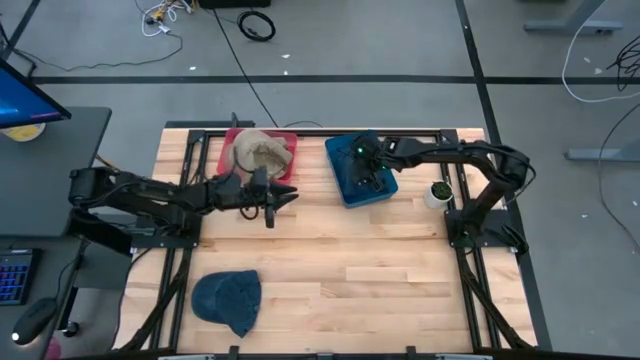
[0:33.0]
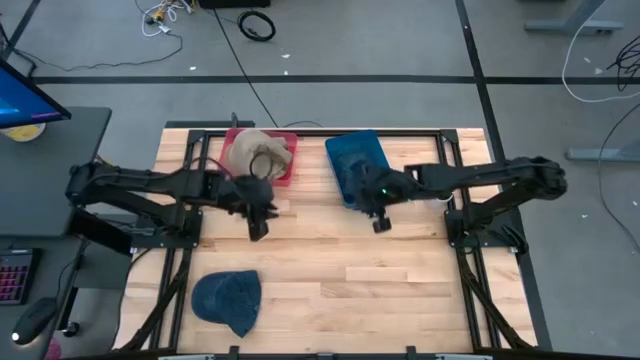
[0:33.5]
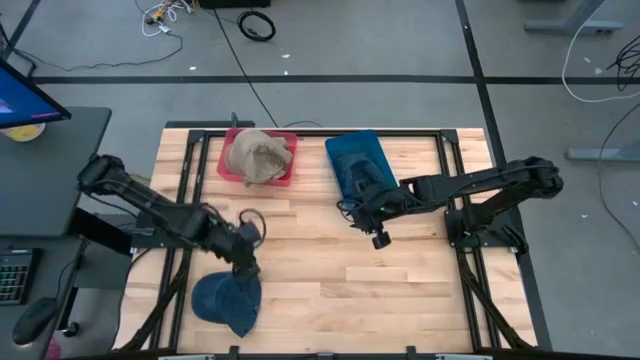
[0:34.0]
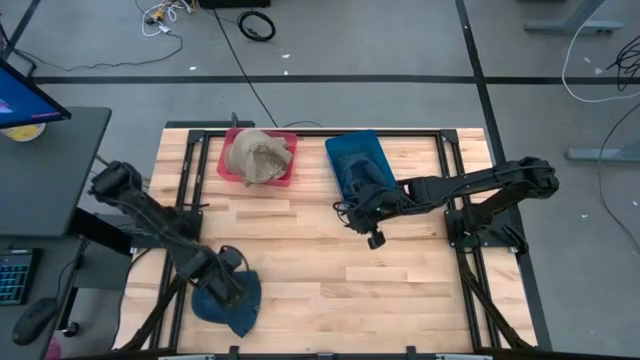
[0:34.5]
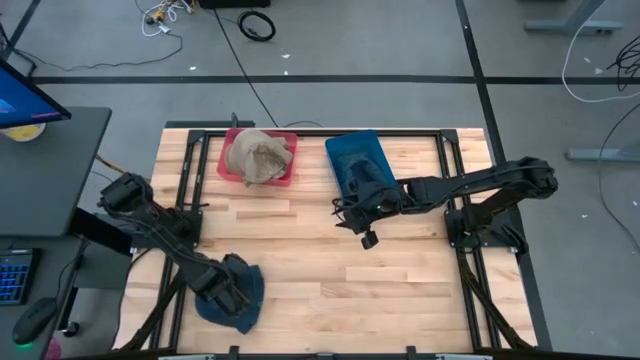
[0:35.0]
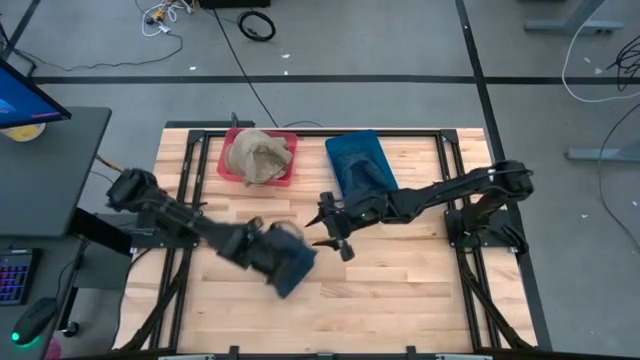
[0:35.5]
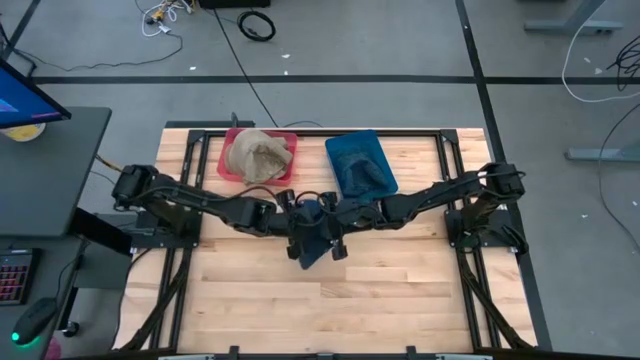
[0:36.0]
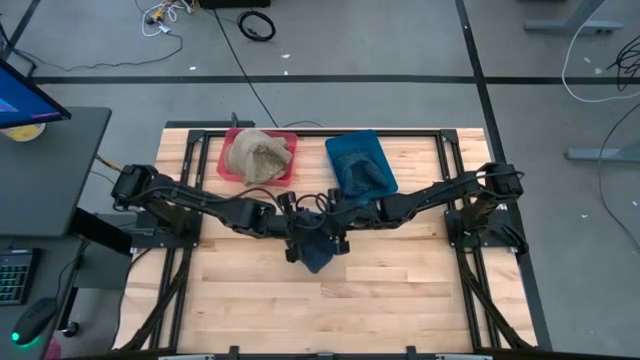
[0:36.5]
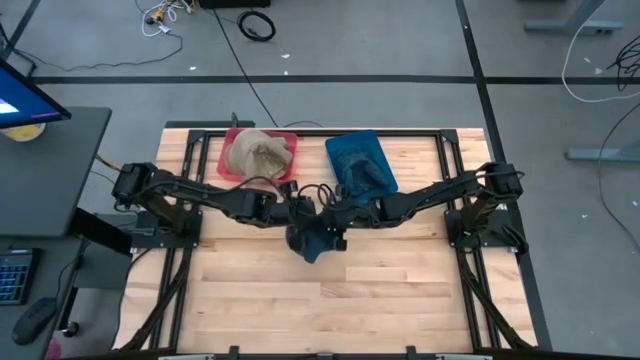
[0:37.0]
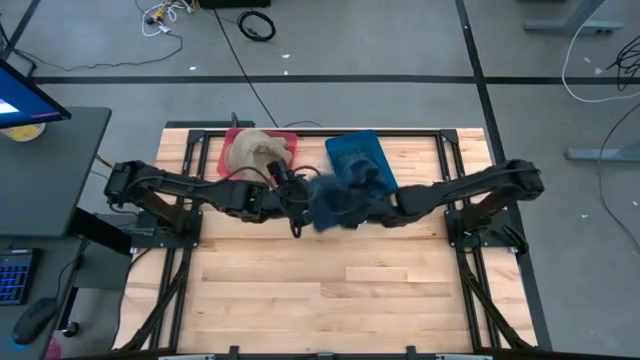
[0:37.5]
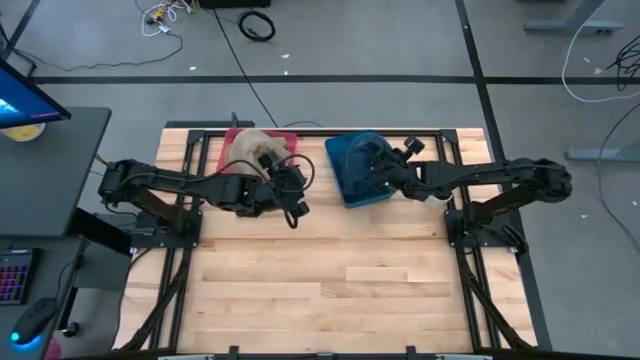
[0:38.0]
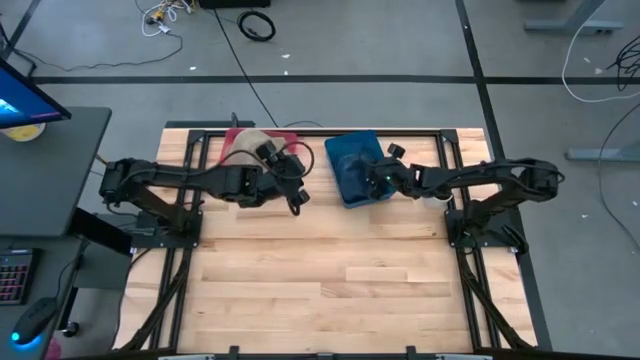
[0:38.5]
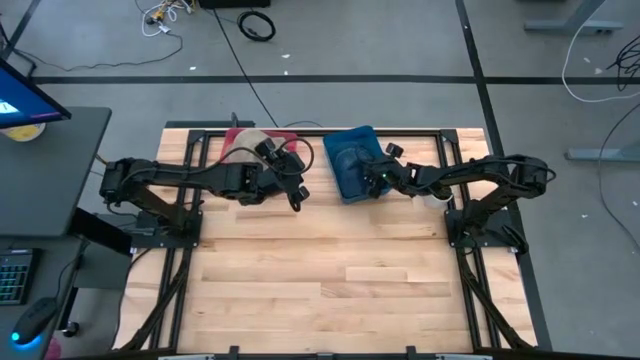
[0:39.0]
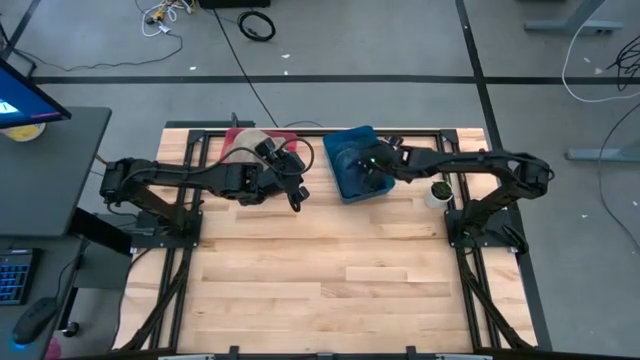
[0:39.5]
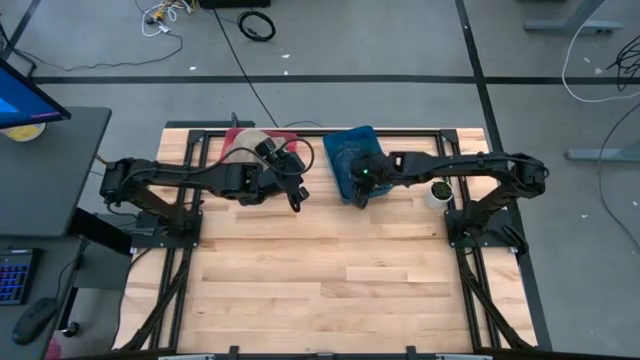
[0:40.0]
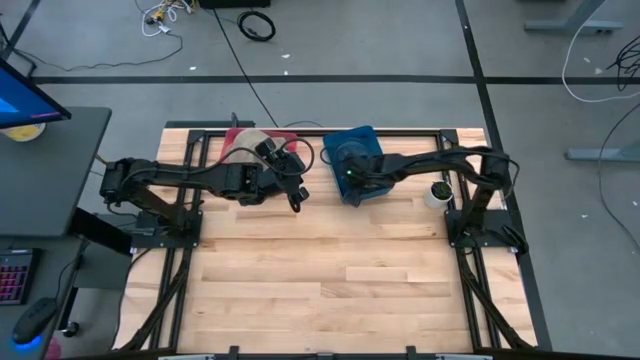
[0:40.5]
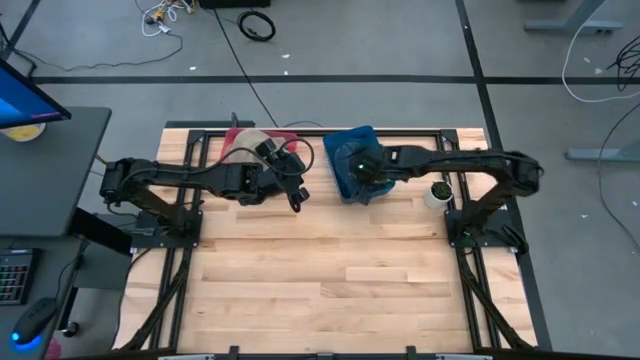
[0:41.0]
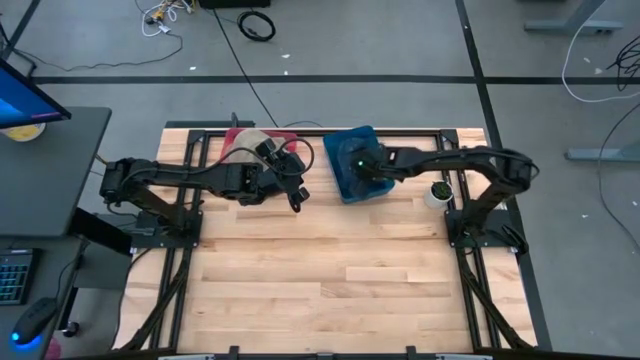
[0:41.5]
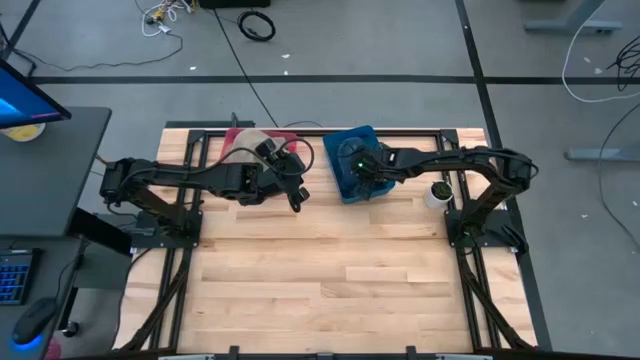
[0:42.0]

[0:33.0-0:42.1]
Task: Pick & Place hat
Put the blue cap into the blue bin

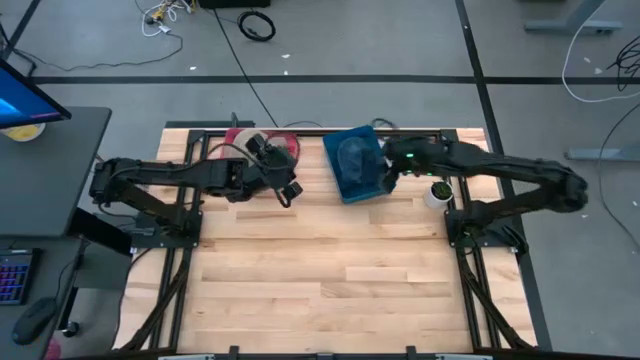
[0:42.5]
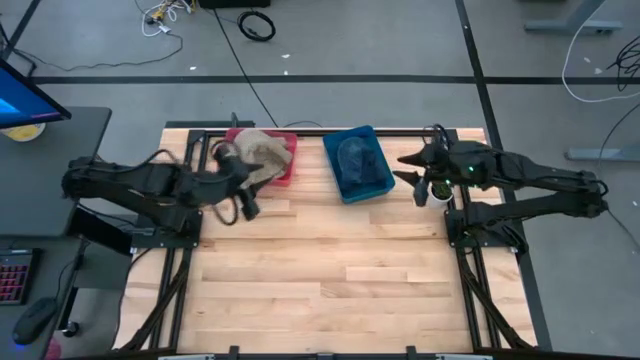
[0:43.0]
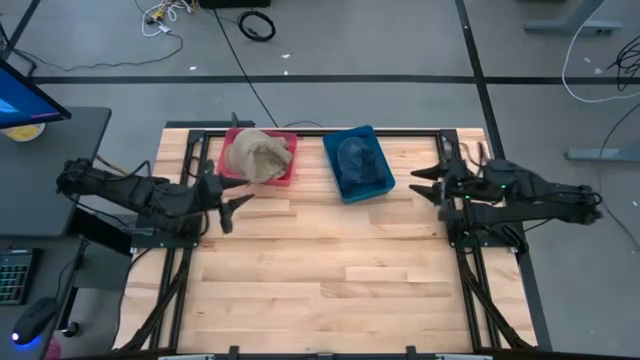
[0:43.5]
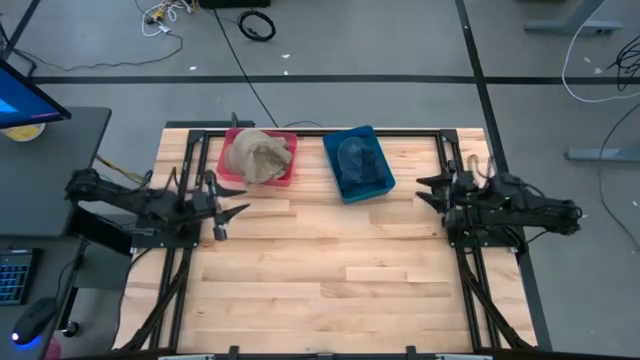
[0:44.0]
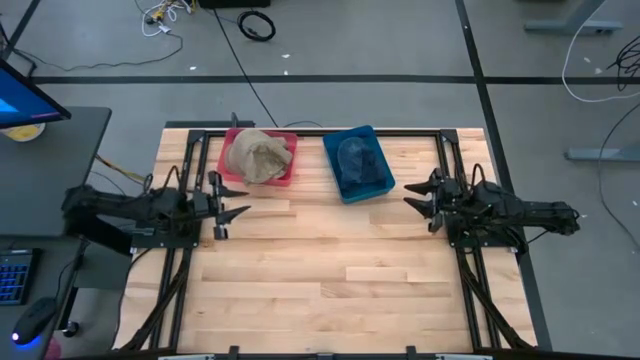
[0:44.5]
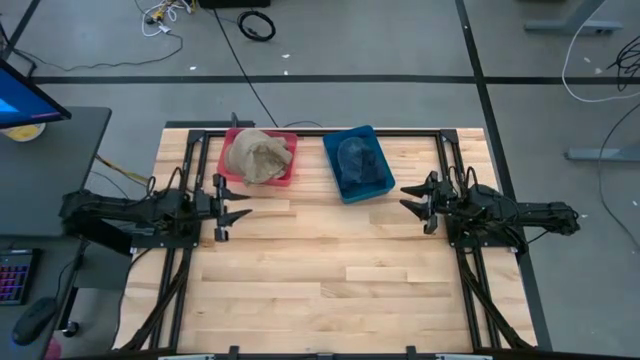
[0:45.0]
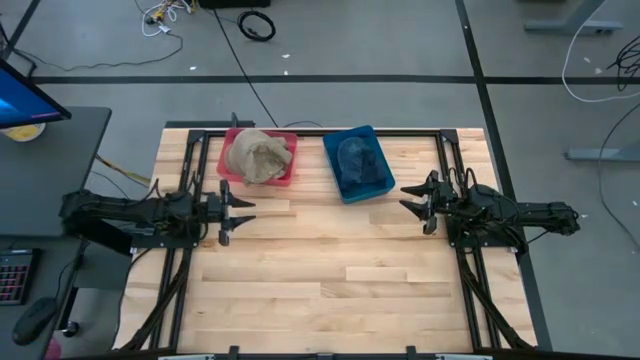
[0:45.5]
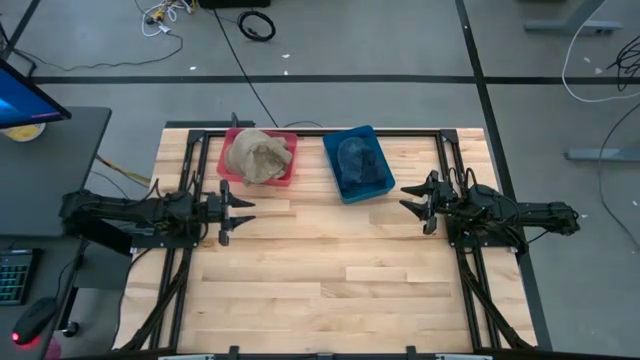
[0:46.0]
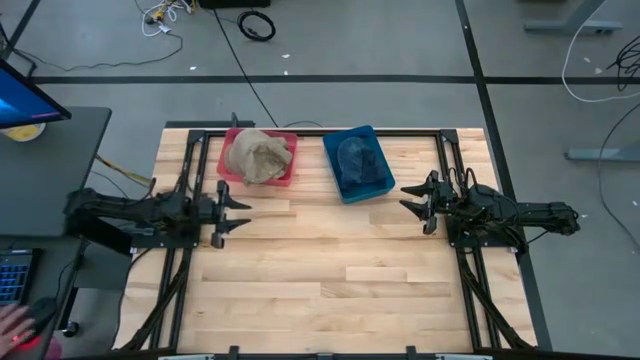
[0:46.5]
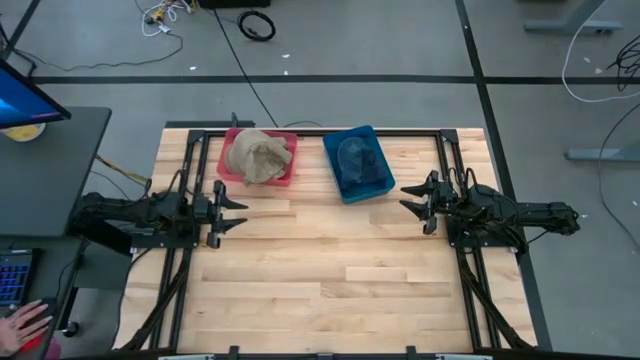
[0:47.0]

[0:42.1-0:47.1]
Return to Home Position

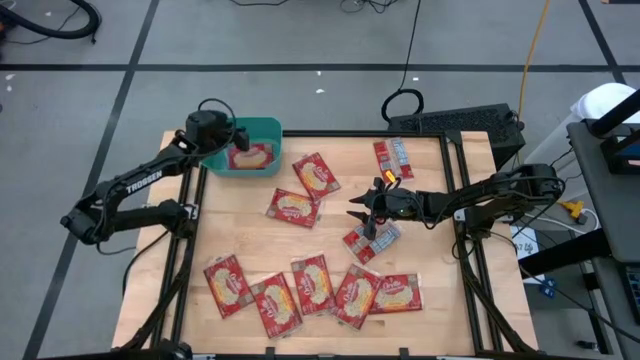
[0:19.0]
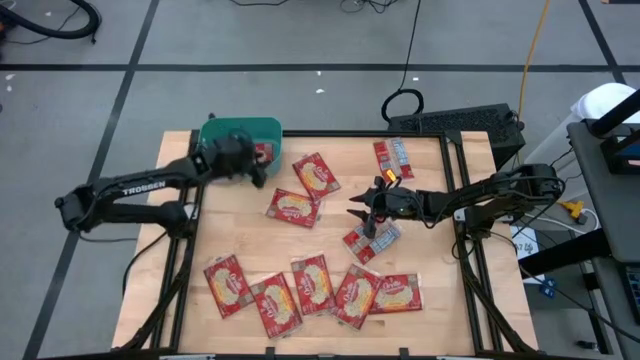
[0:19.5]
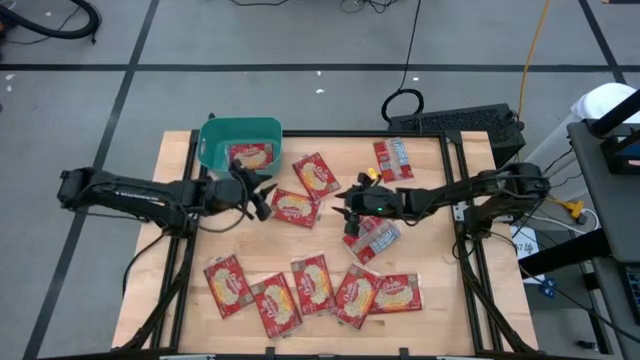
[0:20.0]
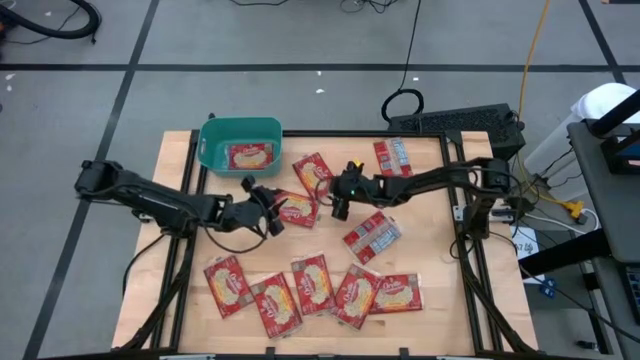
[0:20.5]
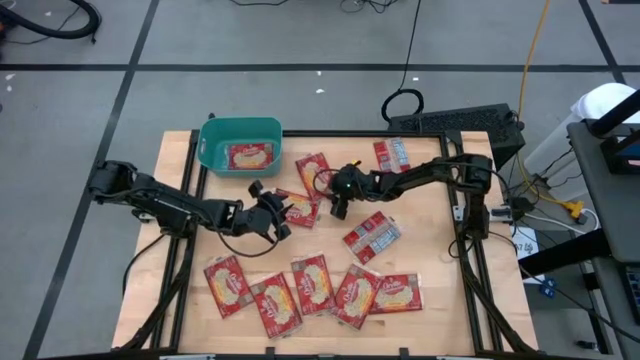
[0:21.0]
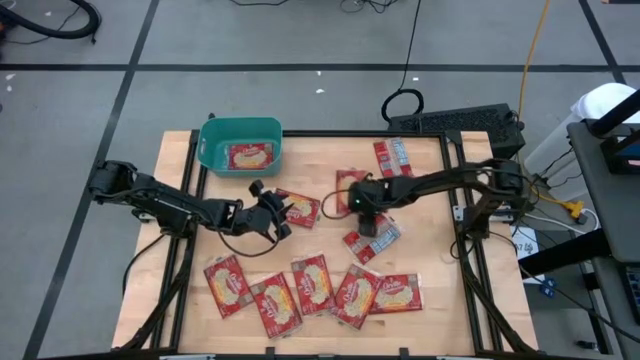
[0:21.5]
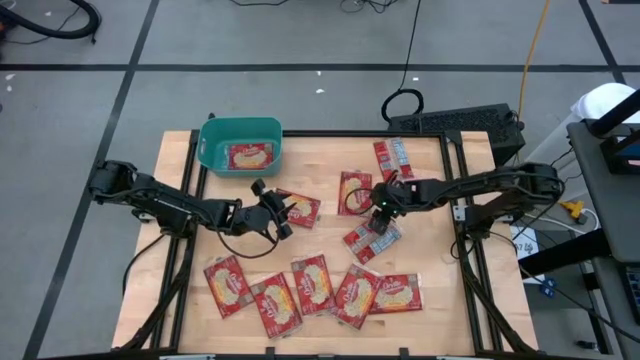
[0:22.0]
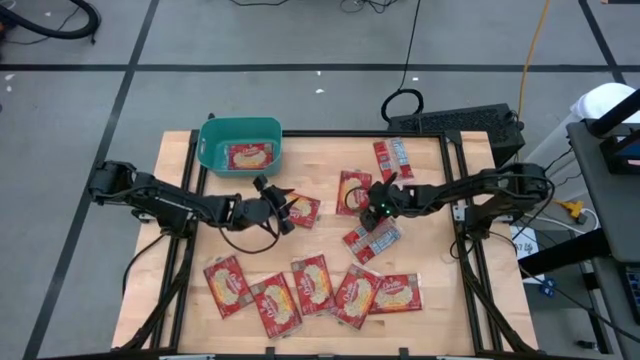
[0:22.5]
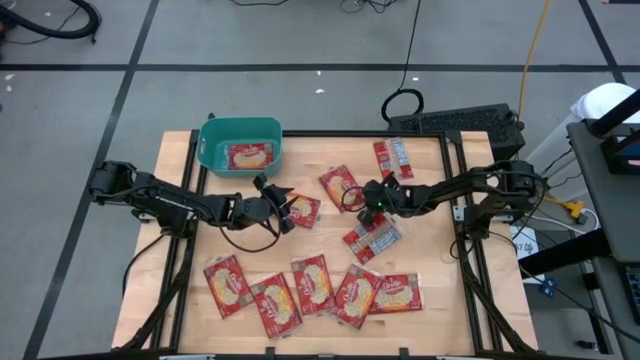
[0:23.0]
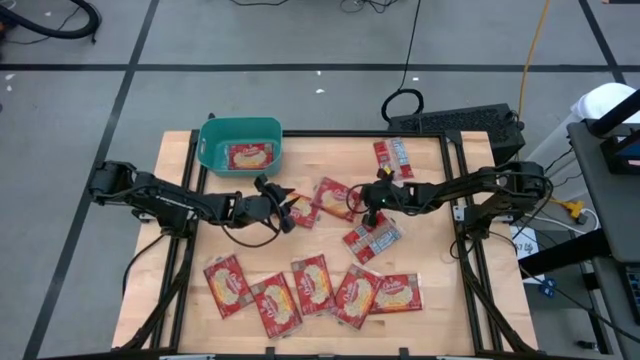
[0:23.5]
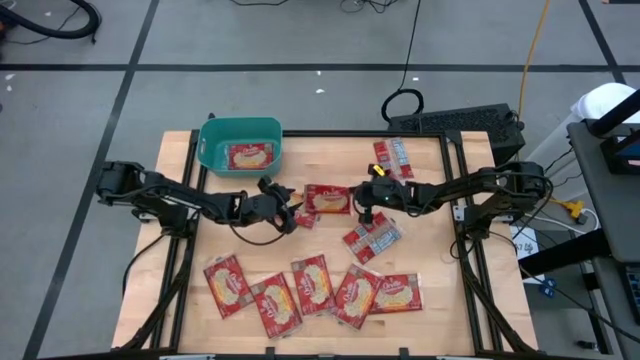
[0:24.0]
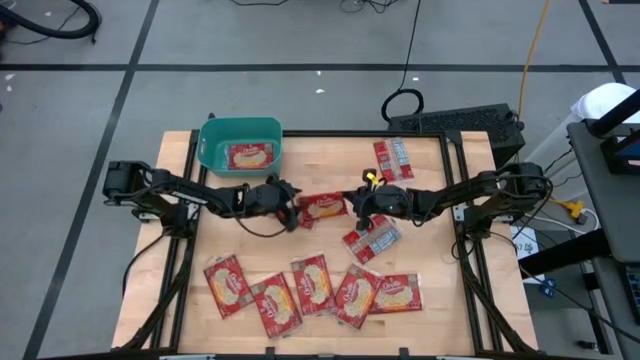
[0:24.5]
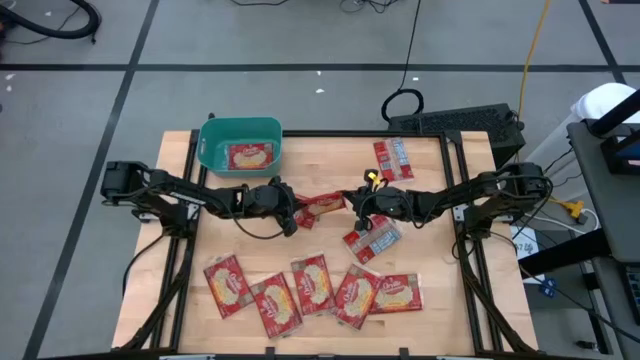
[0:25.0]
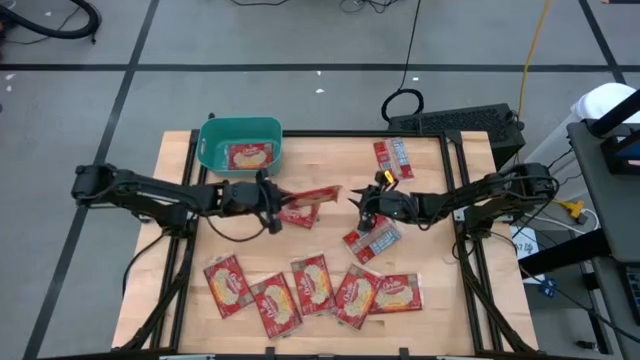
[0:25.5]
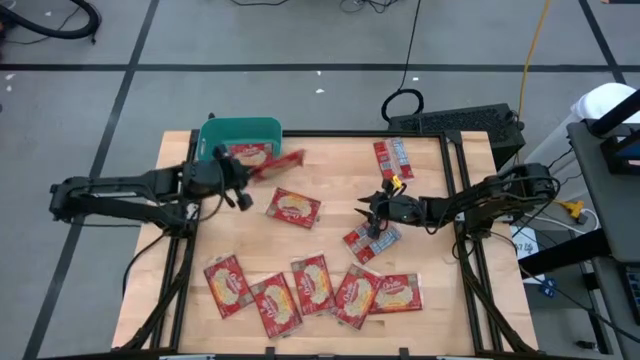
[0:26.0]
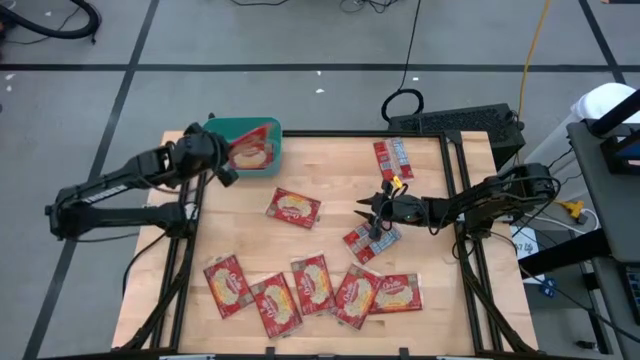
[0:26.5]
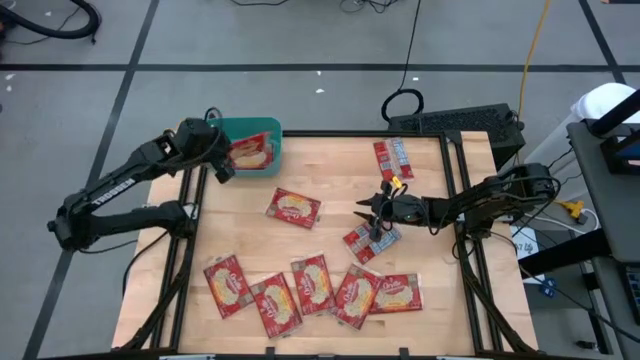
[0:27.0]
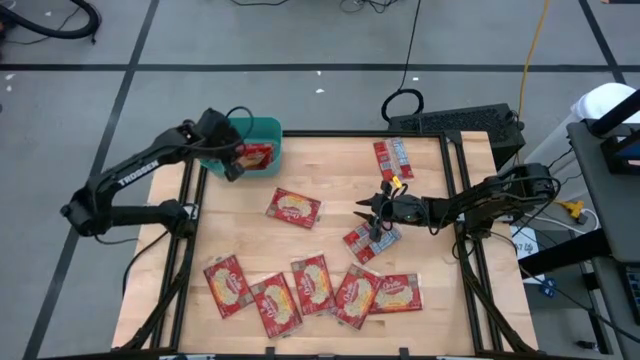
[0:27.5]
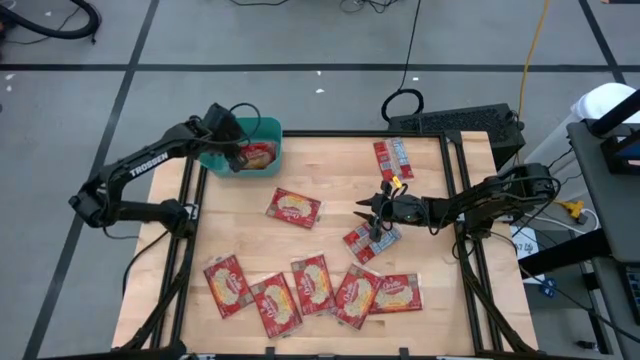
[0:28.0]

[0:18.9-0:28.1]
Task: Sort popcorn bags into baskets
Put the red popcorn bag into the green bin
